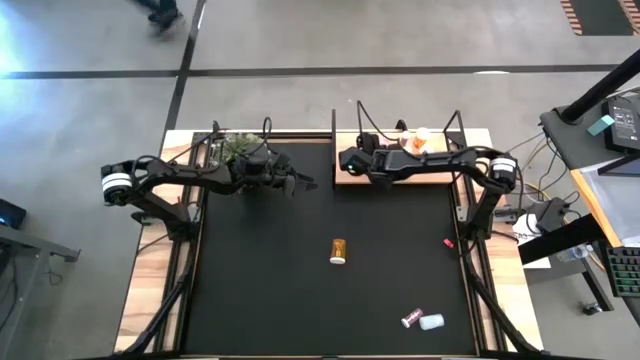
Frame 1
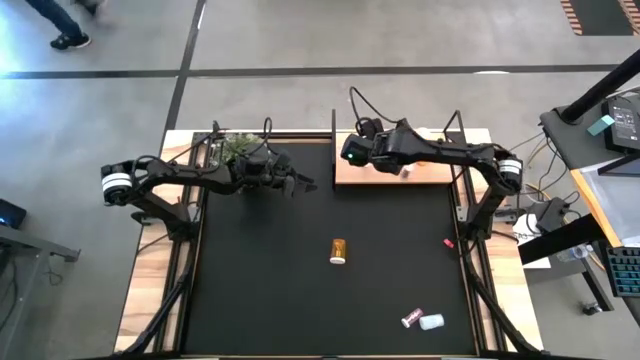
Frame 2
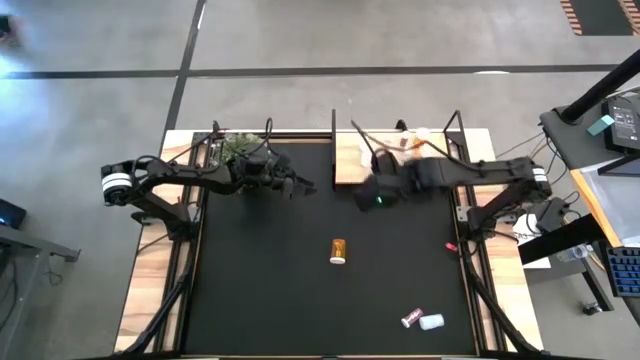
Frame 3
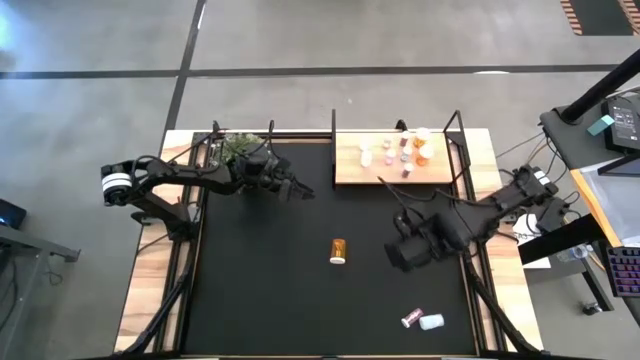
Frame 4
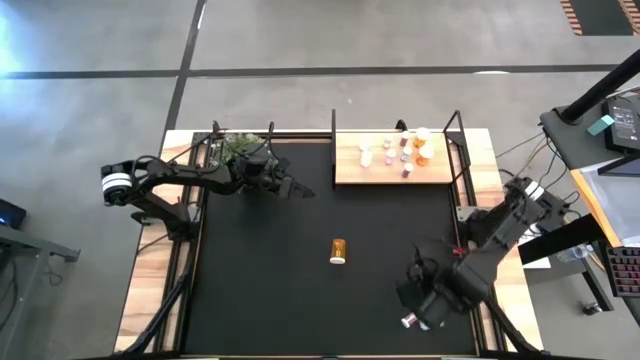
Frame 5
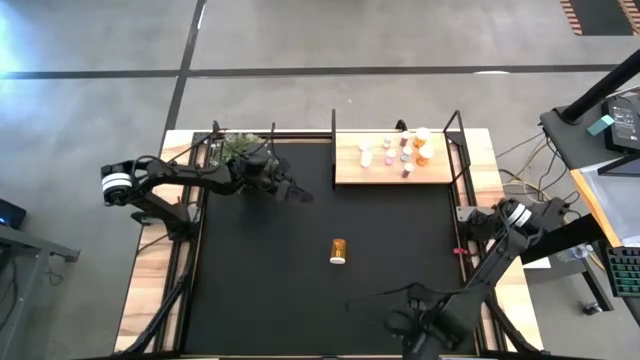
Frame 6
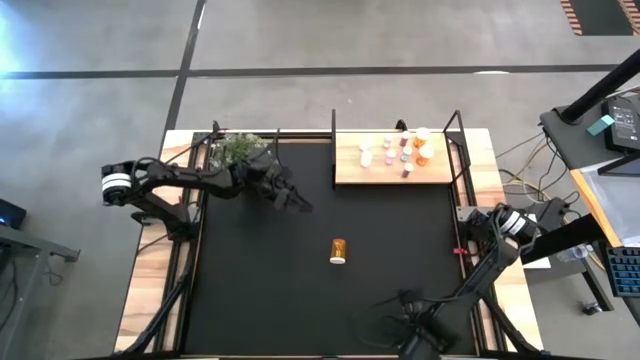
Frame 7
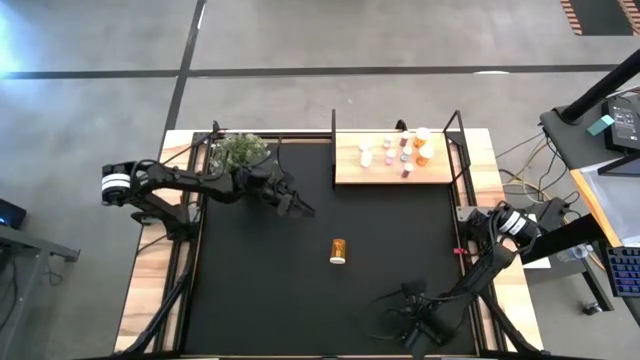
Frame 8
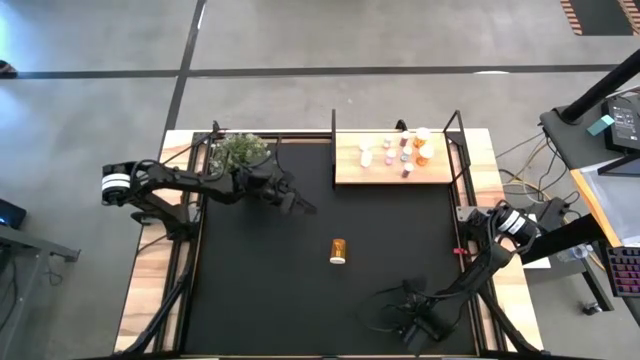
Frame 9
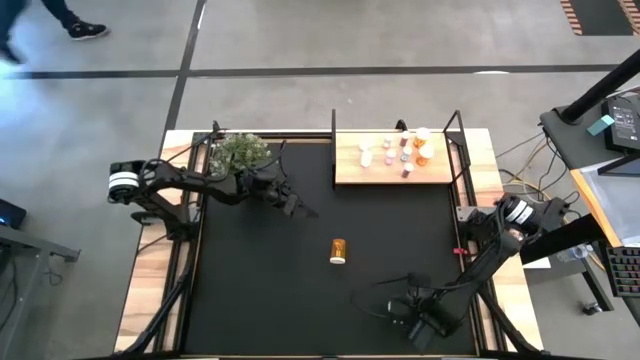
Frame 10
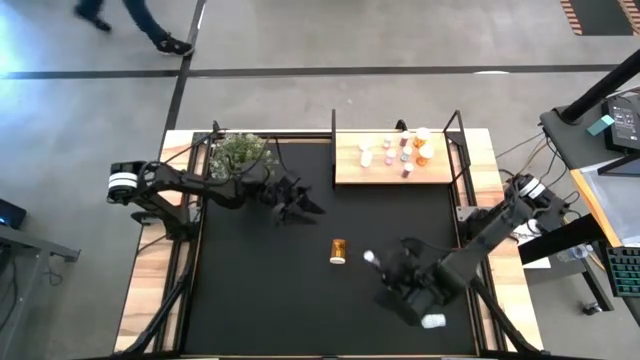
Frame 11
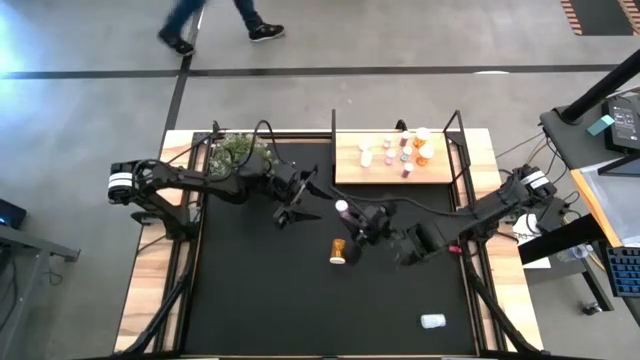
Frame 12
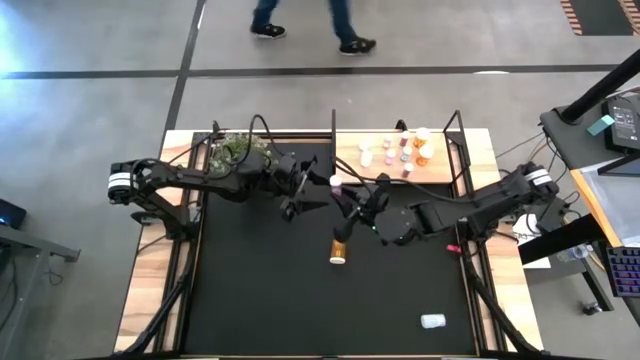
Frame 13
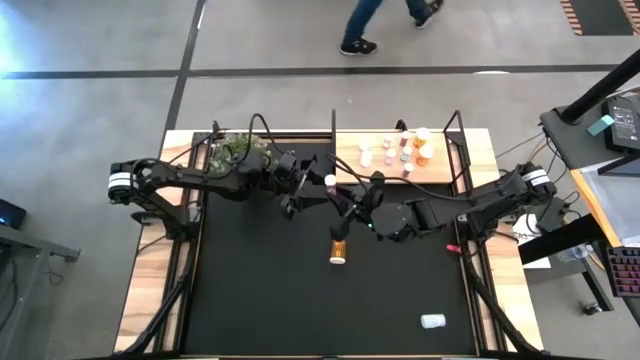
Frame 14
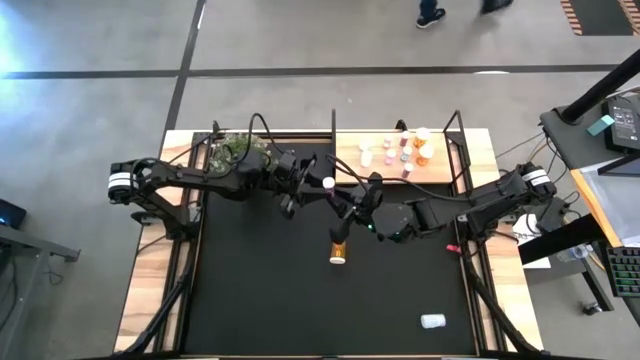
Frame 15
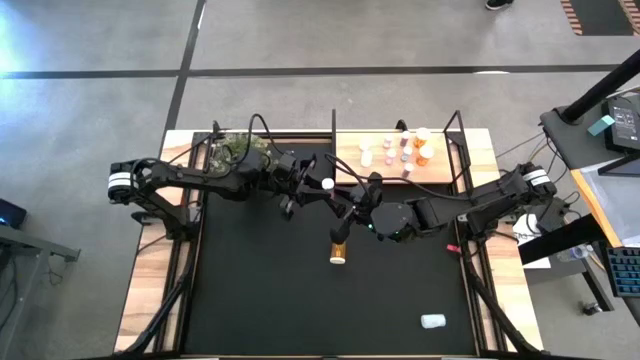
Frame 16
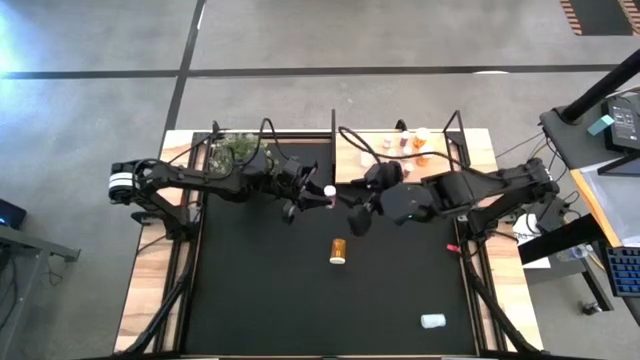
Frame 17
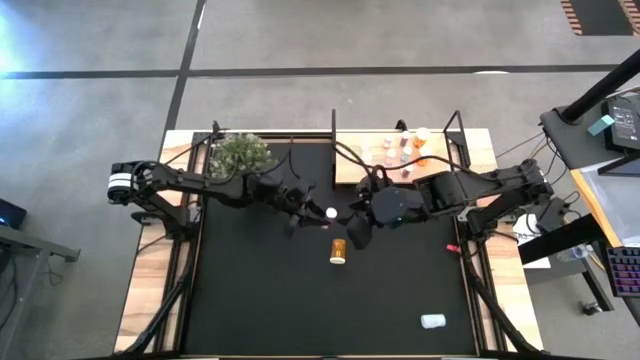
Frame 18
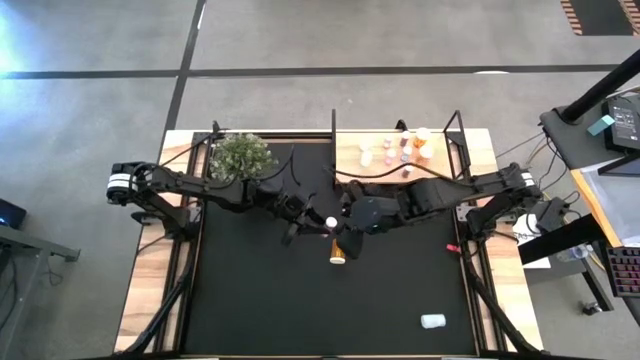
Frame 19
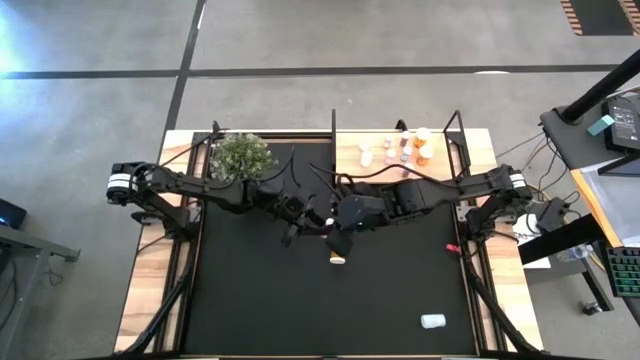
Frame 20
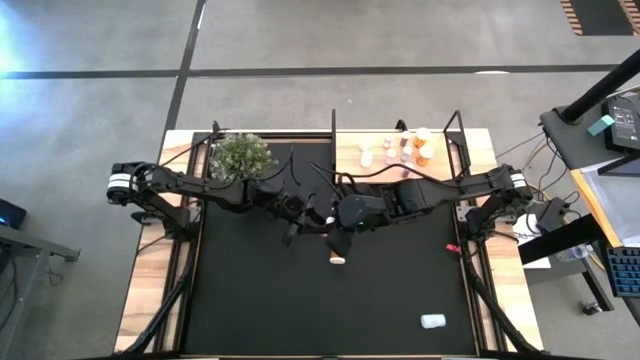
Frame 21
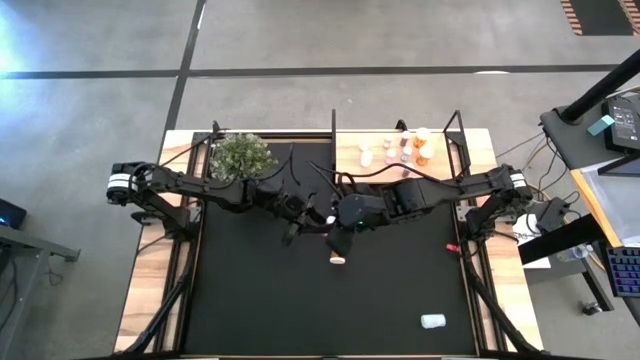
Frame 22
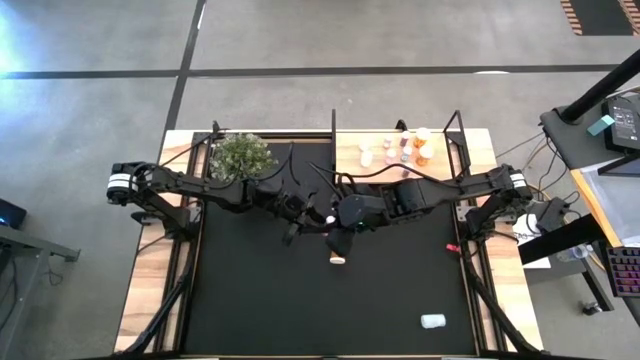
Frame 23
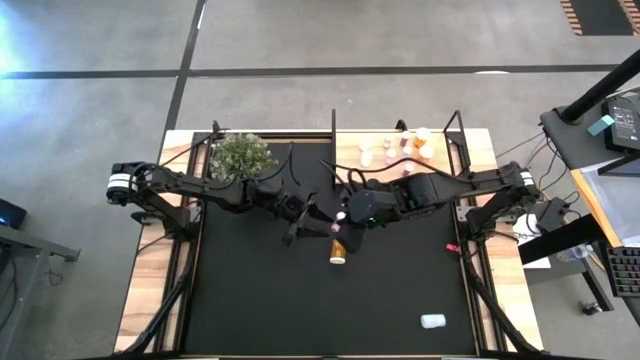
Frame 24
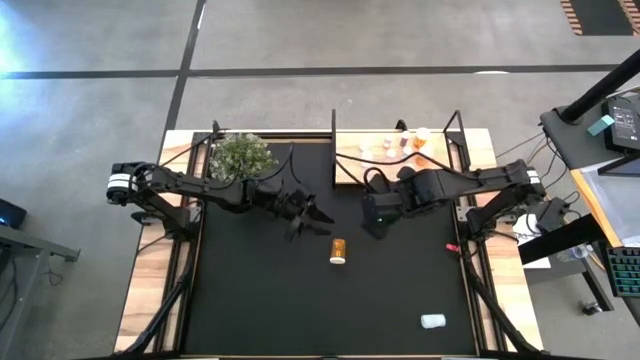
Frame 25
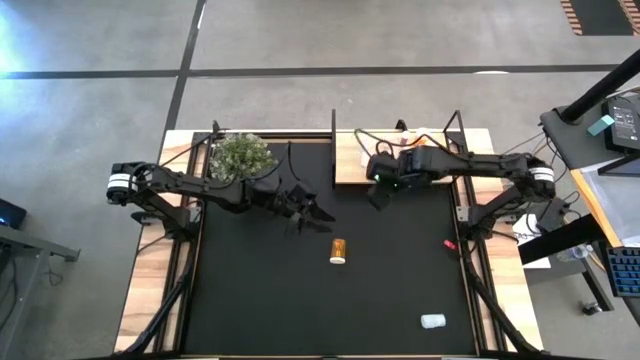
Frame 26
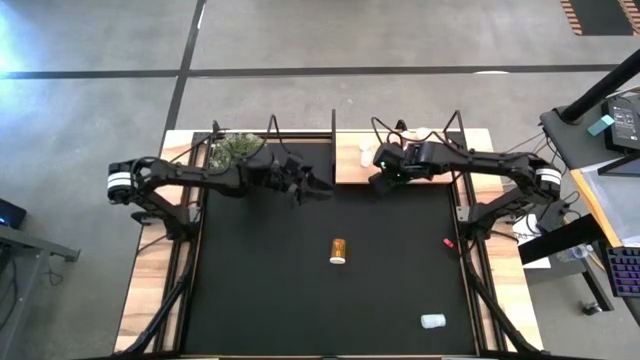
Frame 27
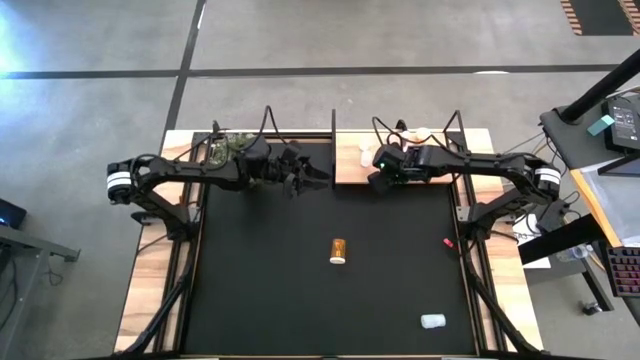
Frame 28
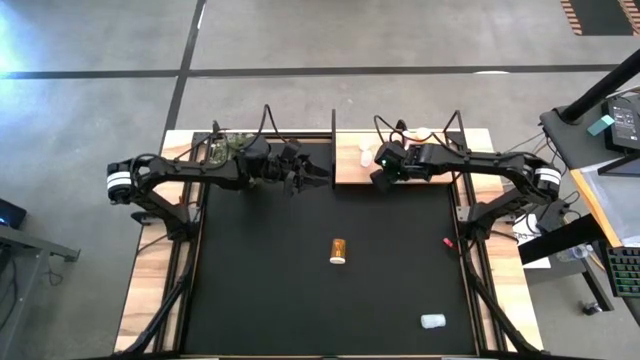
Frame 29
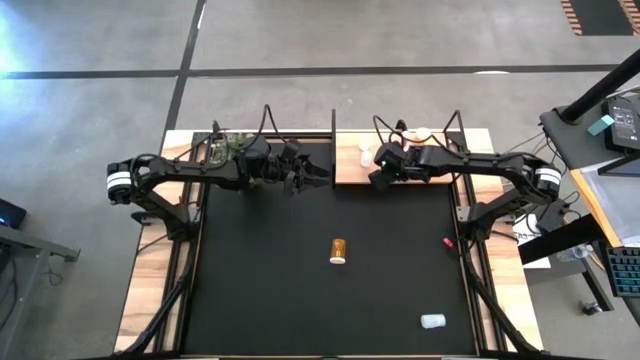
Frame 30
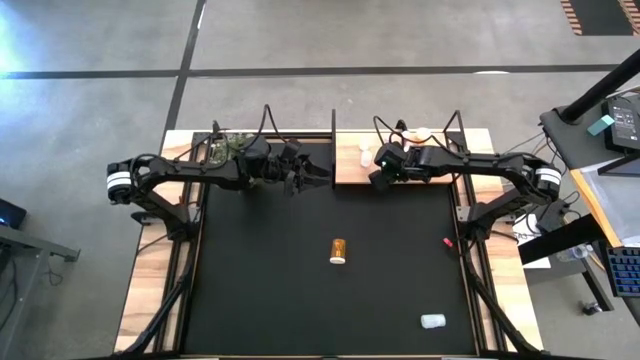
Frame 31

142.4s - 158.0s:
Task: Pick and place medicine bottles onto shelf by color
Put the pink pill bottle on the shelf aligned with the other pink pill bottles

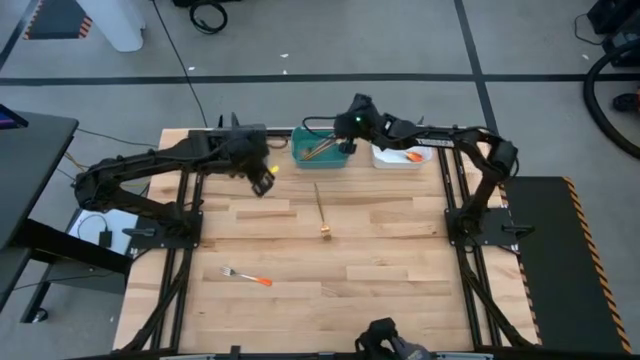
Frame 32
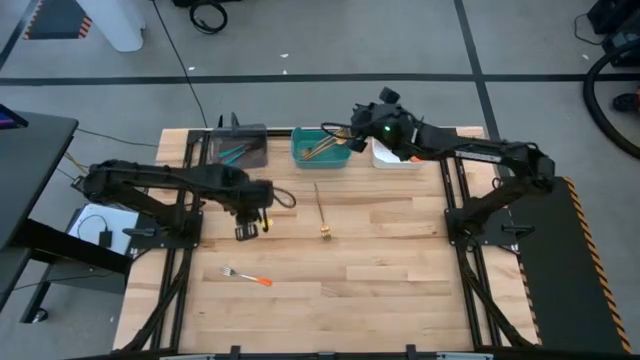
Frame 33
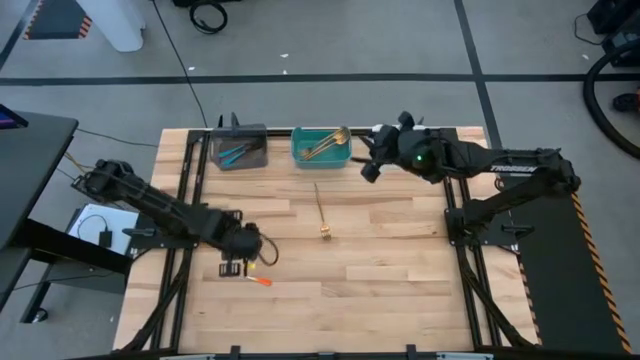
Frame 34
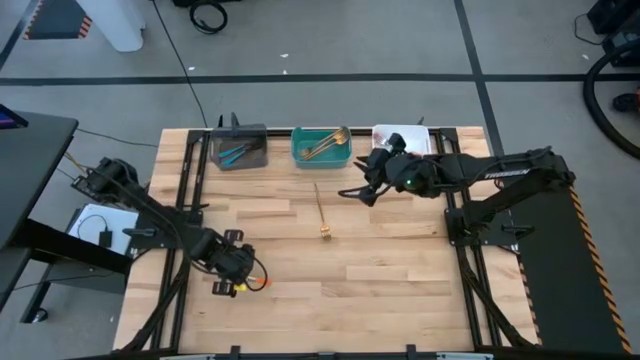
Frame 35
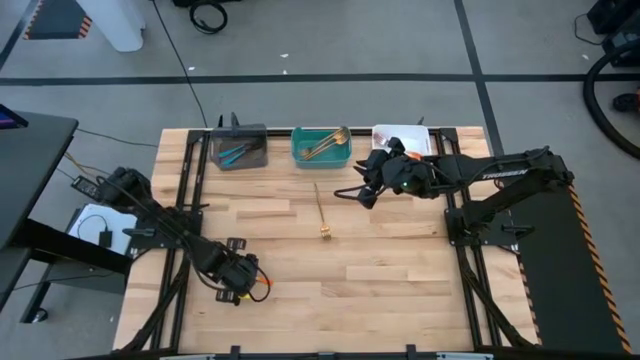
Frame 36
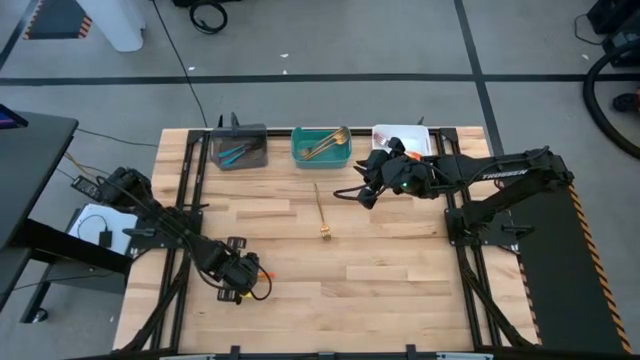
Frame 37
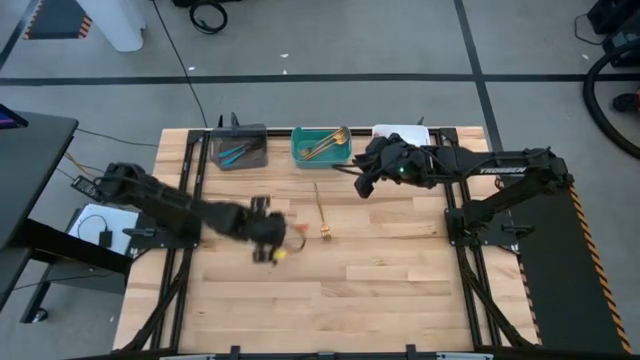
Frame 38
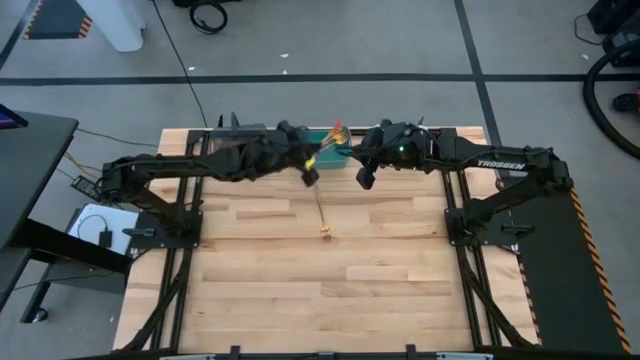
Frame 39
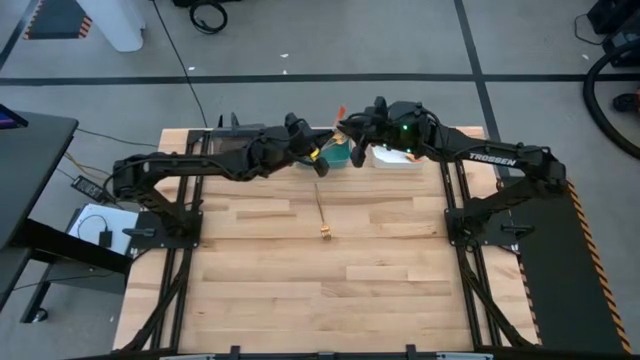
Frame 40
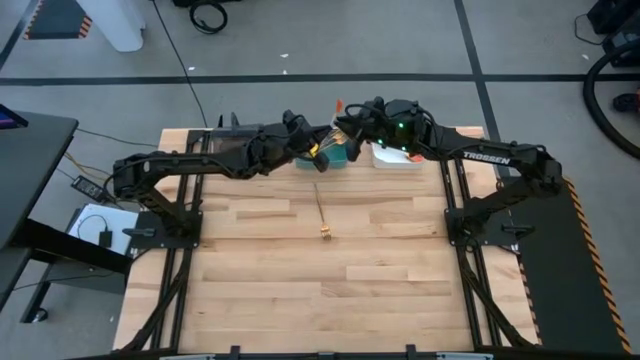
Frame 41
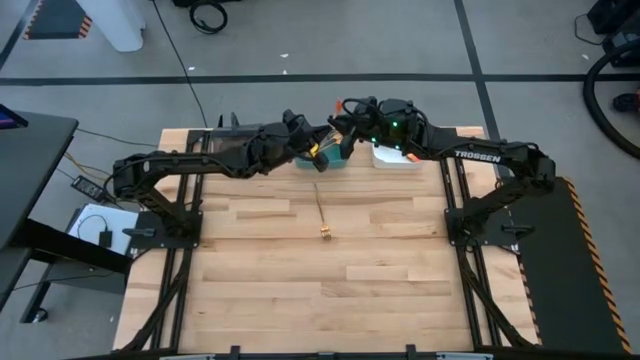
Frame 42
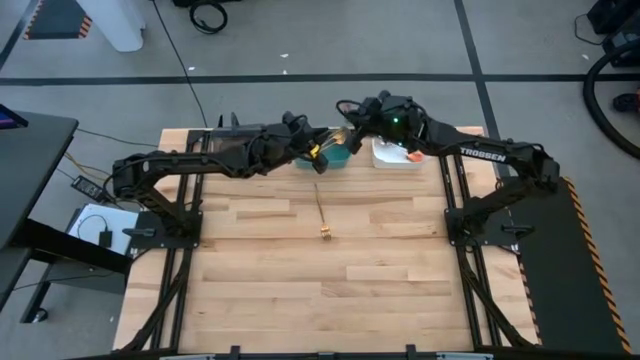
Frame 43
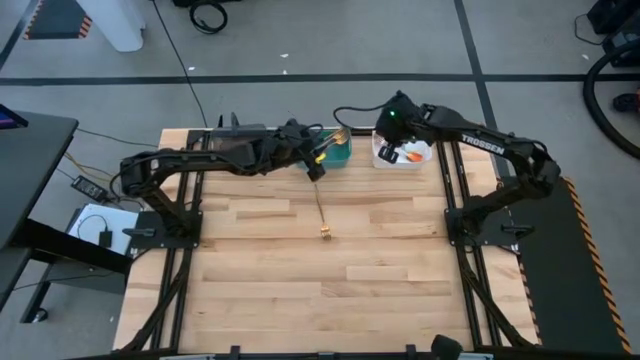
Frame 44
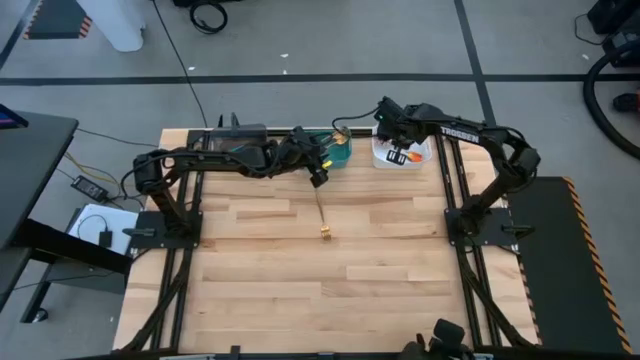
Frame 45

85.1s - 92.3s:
Task: Sort silverware by color (type)
Put the orange fork into the white bin
